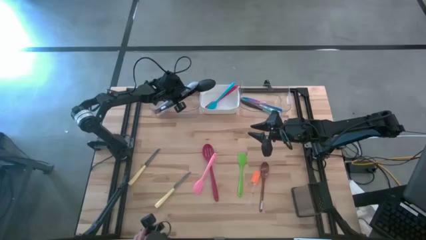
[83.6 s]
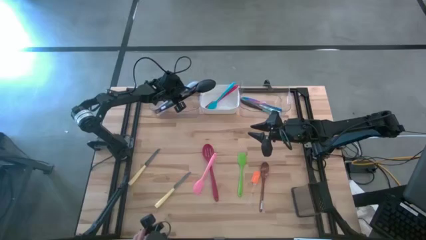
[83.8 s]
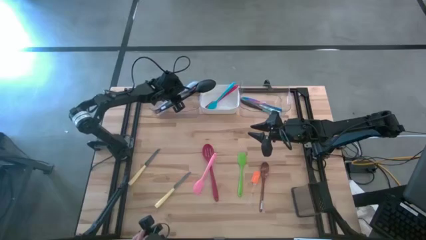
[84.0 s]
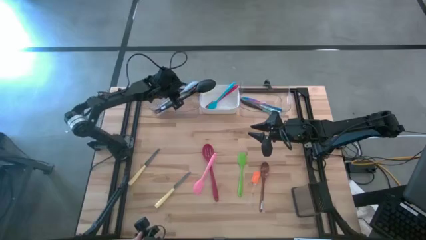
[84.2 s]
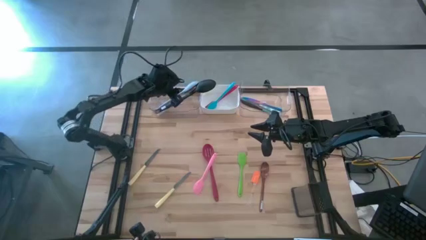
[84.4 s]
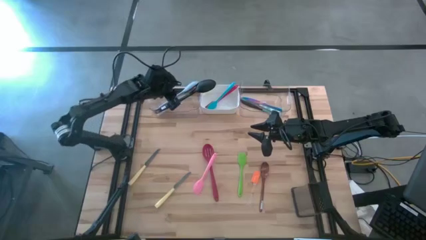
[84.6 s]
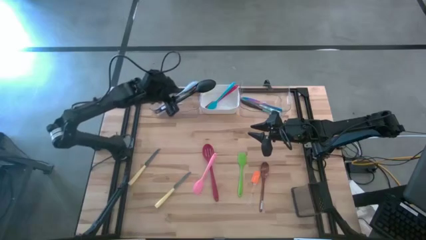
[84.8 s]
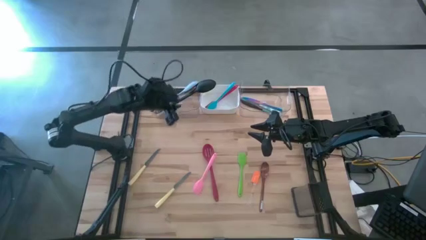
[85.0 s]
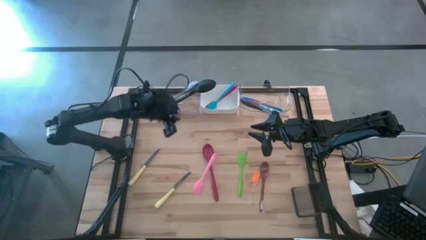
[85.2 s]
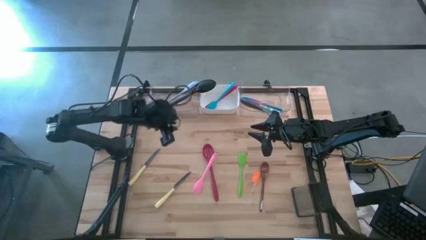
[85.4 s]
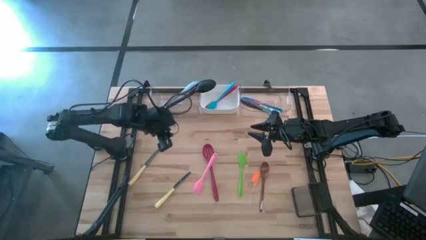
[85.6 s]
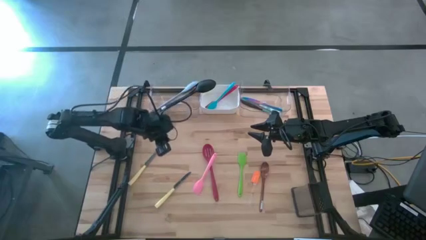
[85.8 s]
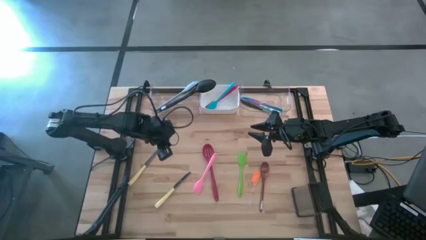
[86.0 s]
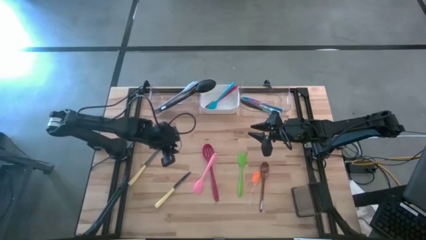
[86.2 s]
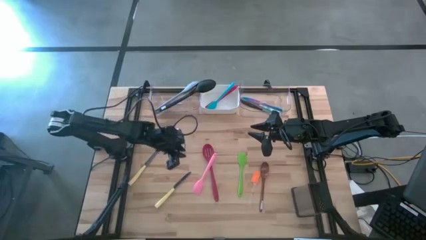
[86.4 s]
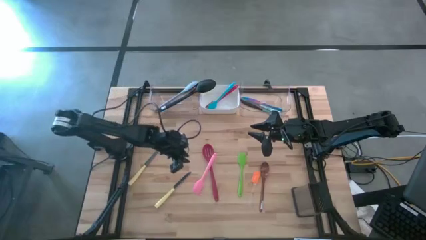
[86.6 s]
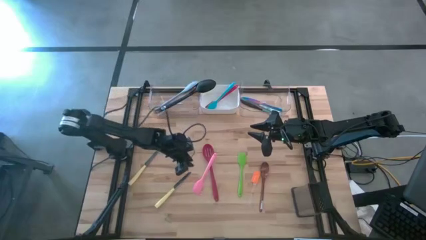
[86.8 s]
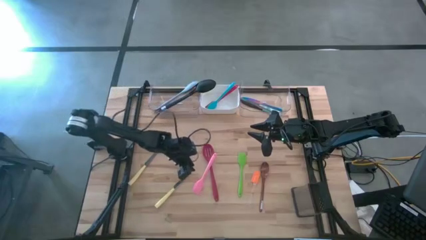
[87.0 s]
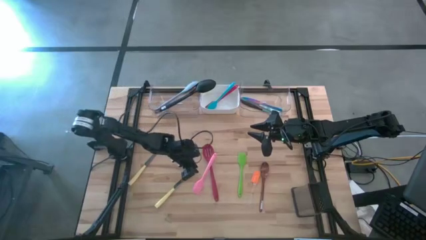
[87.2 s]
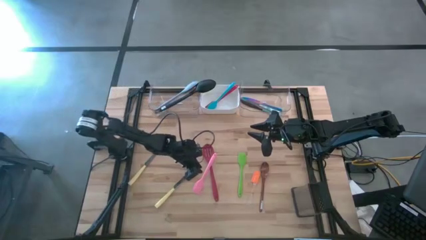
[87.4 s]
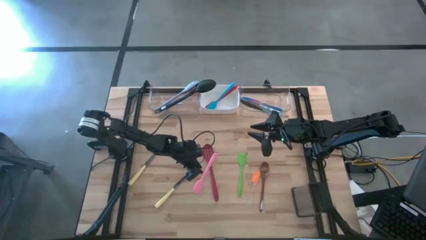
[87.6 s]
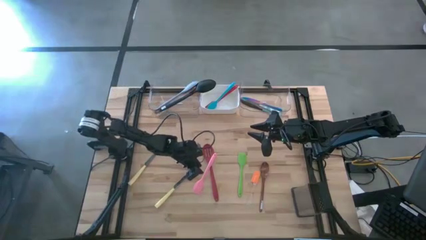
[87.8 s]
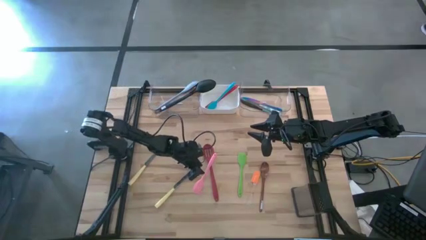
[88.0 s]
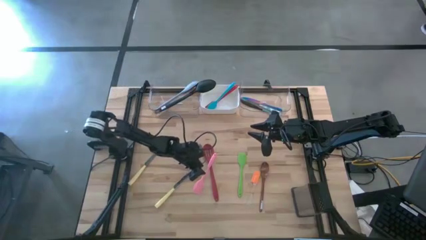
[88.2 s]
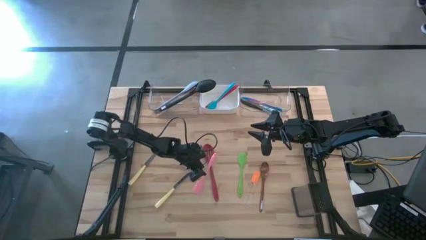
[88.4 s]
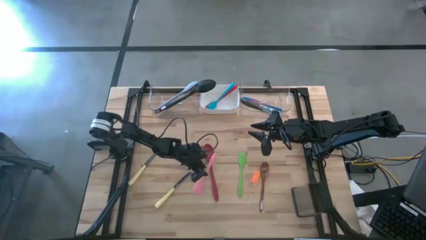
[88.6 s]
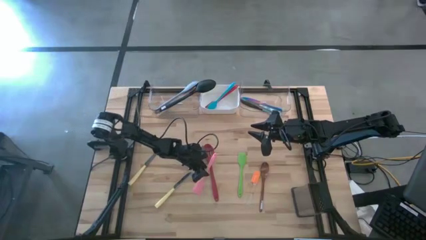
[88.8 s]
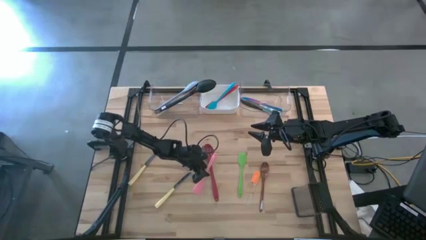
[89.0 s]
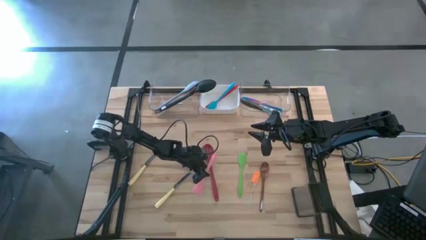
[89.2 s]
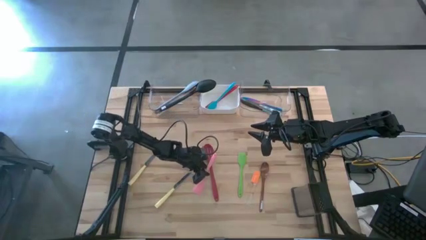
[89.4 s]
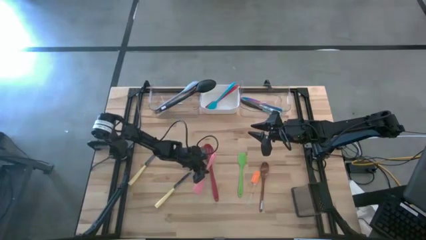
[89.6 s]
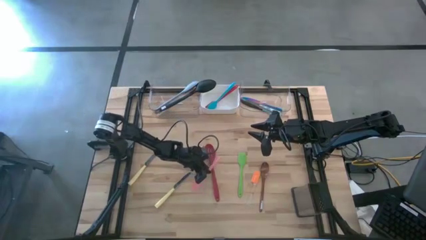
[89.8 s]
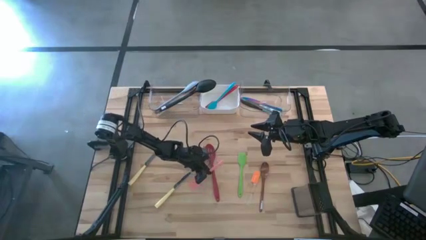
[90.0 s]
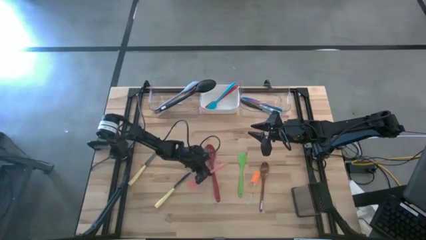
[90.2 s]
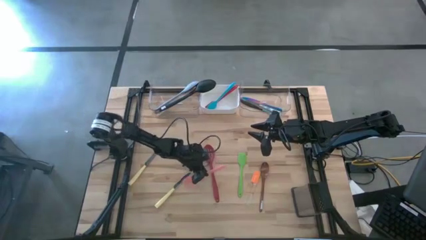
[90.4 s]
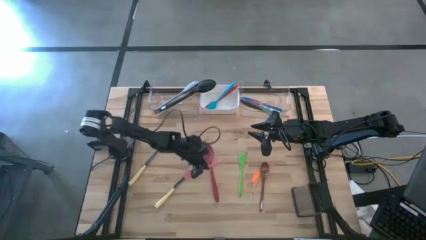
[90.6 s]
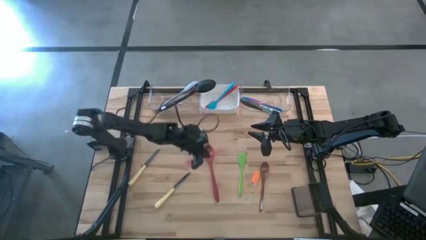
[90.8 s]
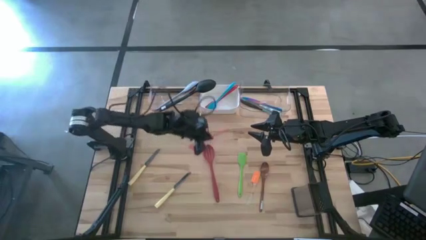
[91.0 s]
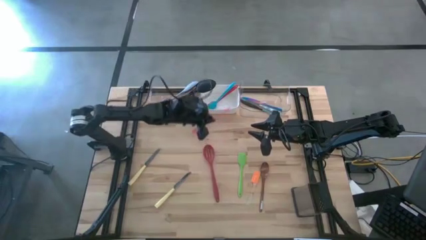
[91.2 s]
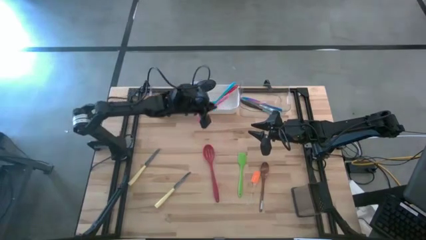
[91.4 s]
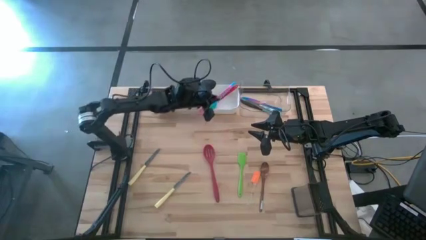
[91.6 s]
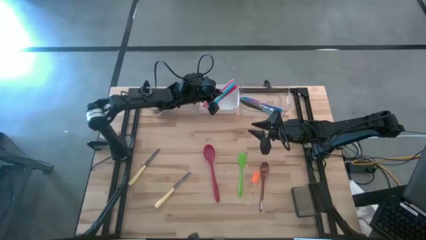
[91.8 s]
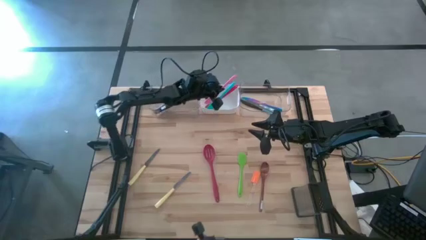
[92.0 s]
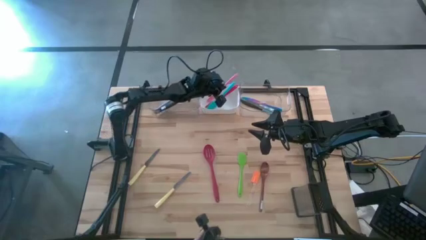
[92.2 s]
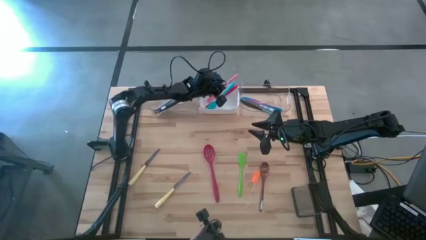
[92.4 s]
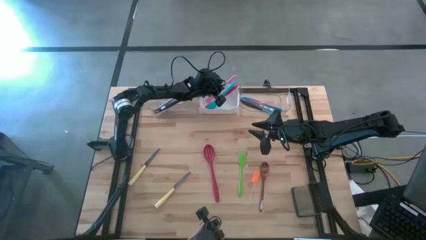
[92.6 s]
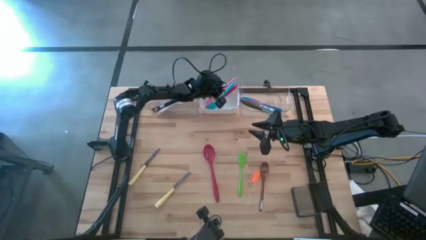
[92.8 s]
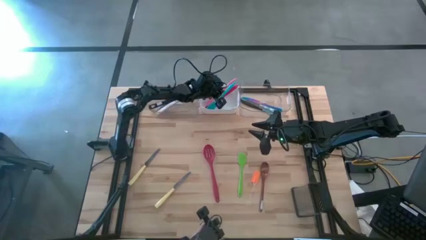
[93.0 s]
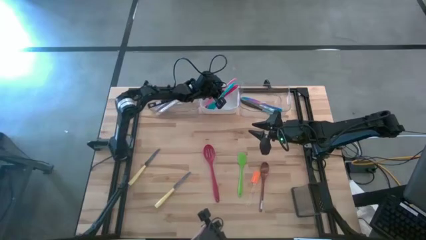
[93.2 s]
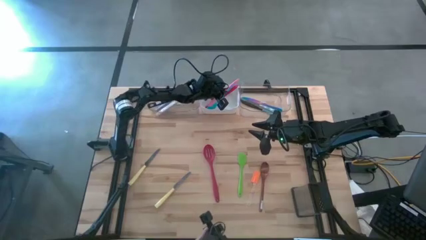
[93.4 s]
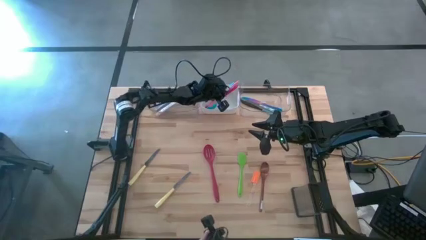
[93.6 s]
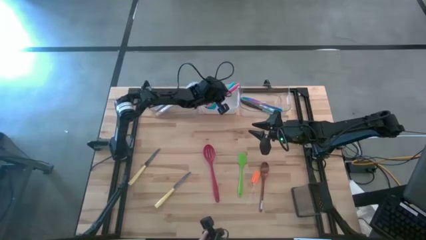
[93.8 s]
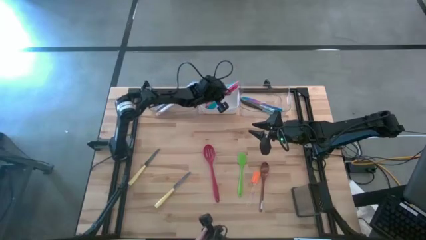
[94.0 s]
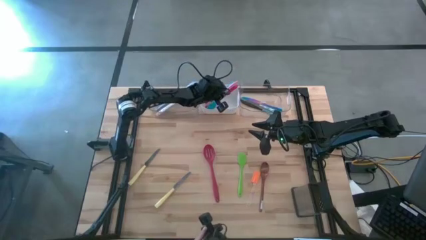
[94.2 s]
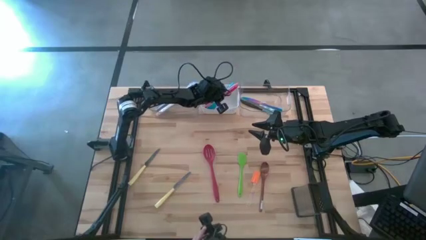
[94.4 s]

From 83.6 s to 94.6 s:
Task: Pick & Place Kitchen Items
Put the pink spatula into the white bin

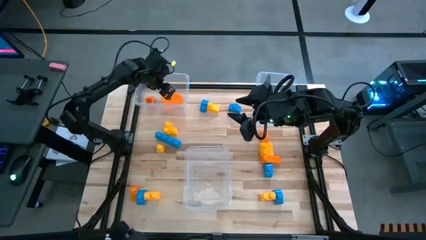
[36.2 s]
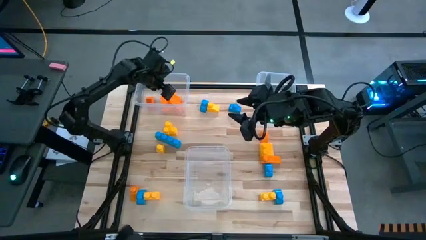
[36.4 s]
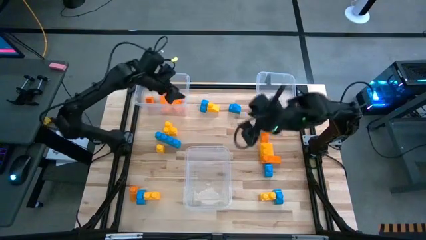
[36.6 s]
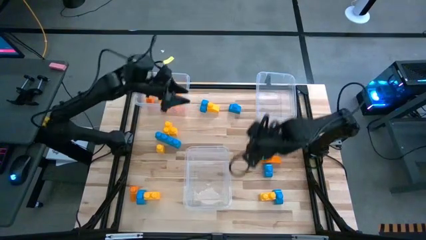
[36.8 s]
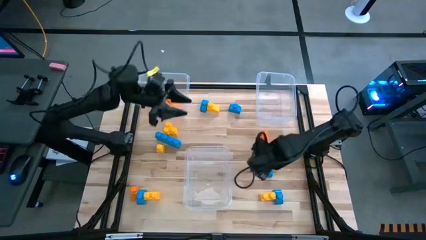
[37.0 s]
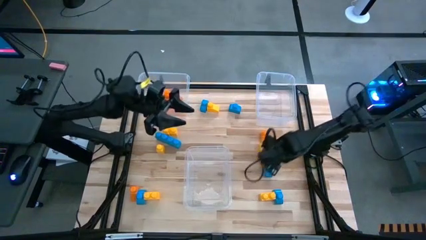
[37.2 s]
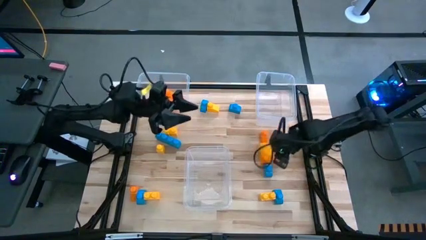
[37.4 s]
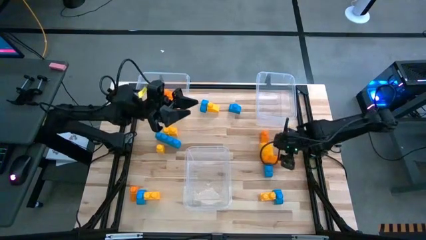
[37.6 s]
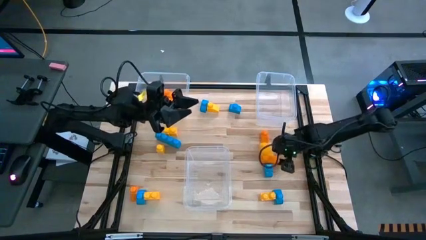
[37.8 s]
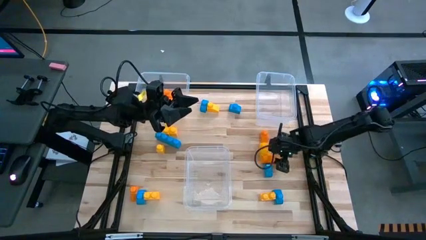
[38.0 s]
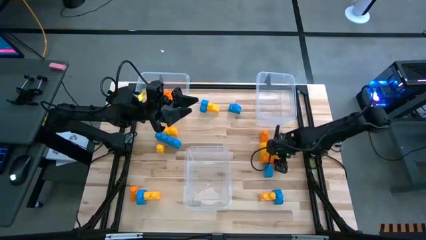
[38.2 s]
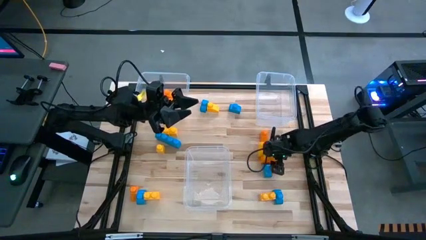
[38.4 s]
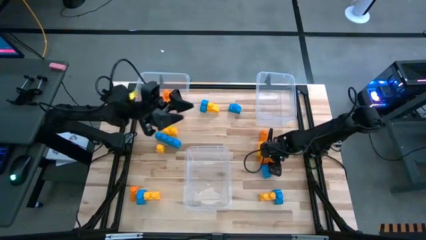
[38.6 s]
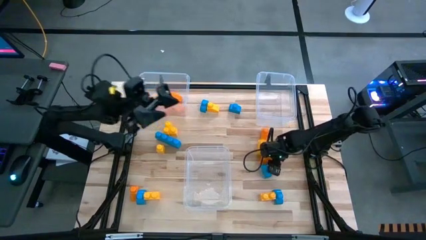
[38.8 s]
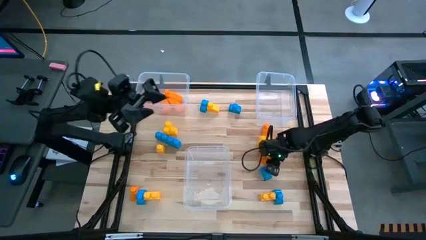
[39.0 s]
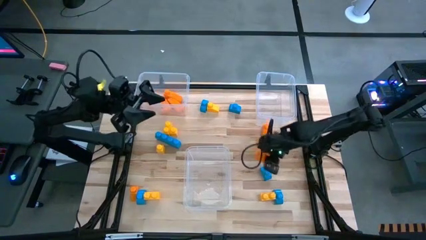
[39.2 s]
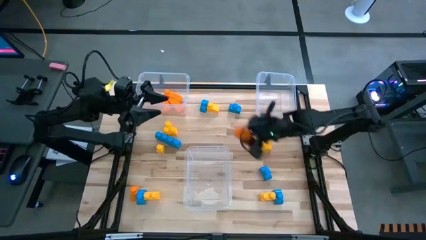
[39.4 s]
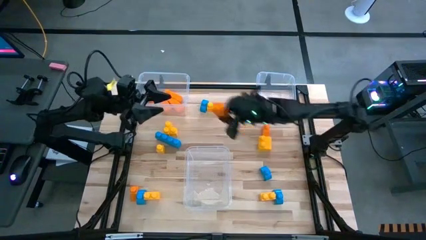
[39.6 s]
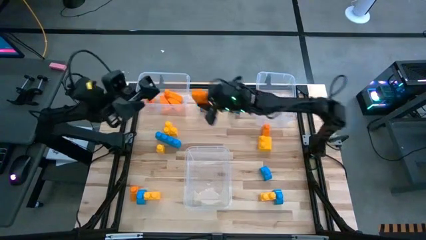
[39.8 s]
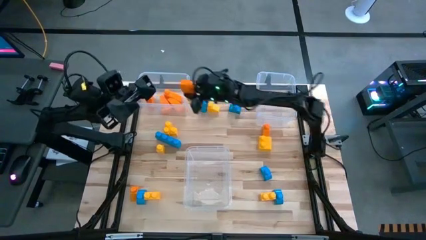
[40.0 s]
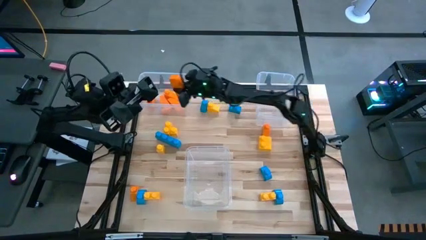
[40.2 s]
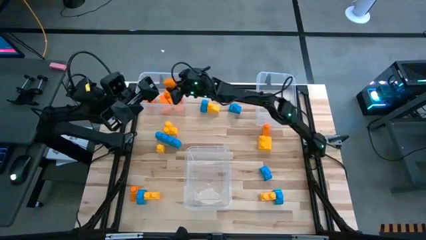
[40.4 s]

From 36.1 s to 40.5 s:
Task: Sort blocks
Put the orange game piece into the top left transparent bin

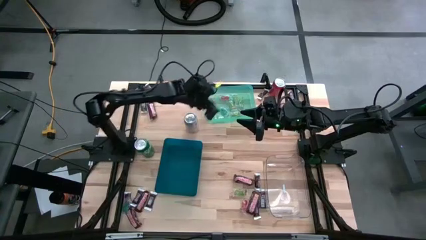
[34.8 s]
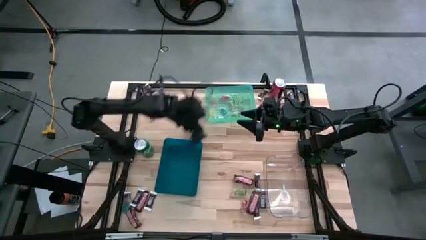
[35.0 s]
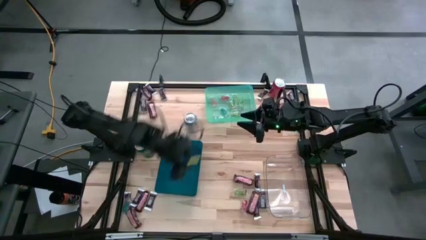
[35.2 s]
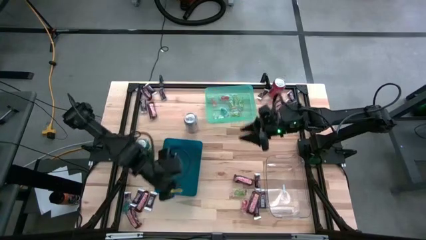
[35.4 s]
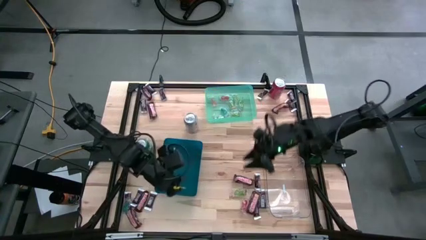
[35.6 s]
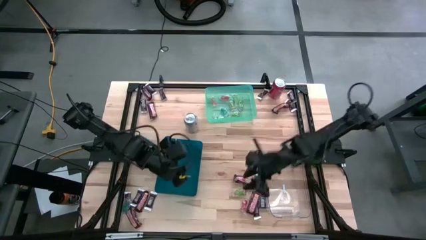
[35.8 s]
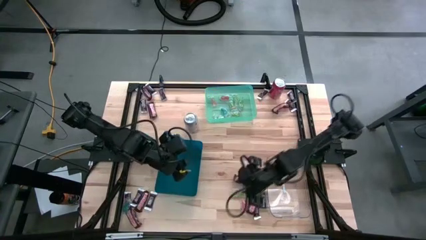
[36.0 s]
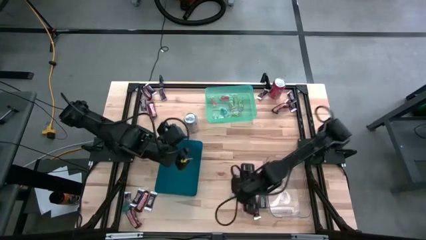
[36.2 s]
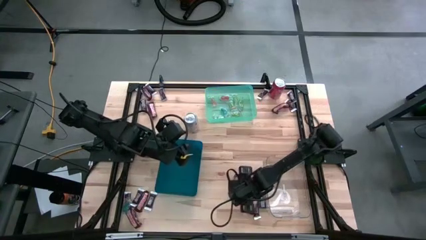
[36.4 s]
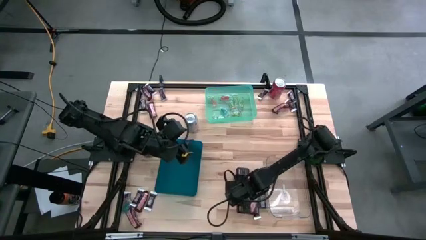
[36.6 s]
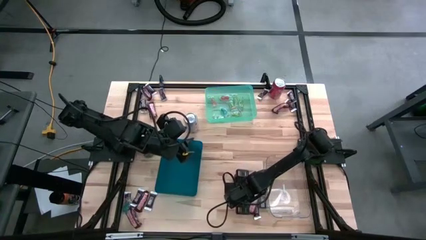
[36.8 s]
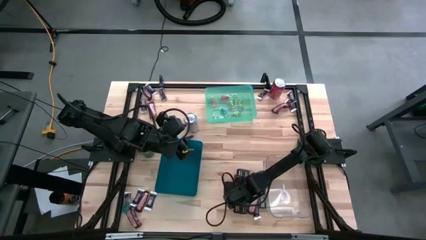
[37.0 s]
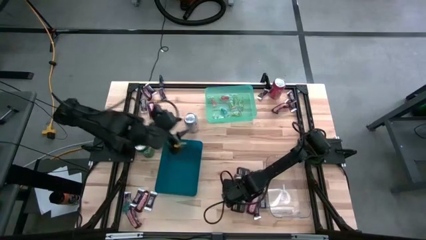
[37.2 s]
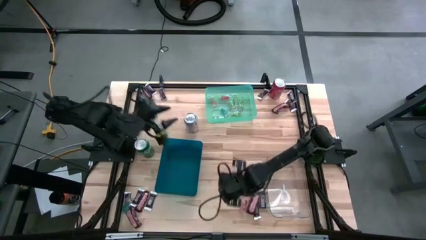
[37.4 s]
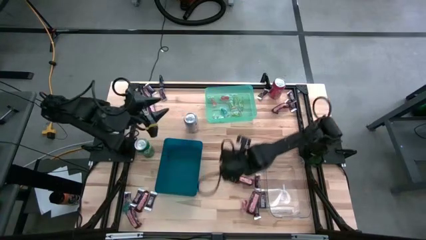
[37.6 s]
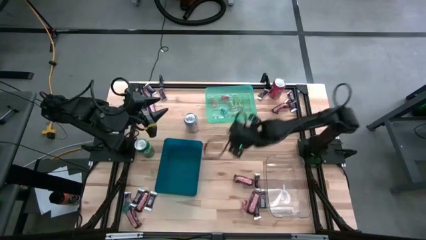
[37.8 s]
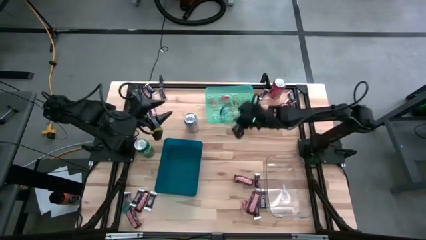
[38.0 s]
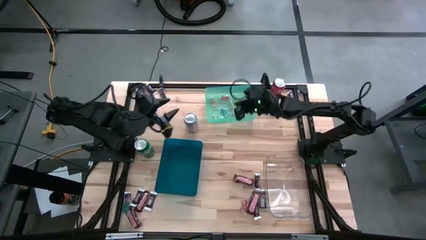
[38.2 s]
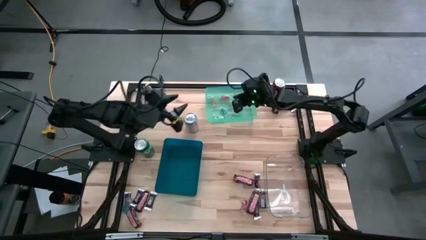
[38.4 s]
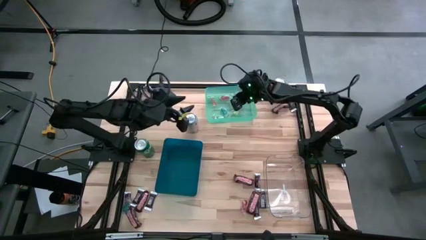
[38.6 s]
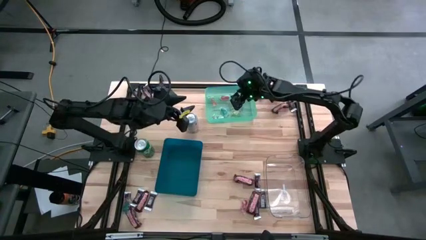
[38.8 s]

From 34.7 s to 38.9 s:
Task: Organize candy in baskets
Put the transparent gummy into the green bin
